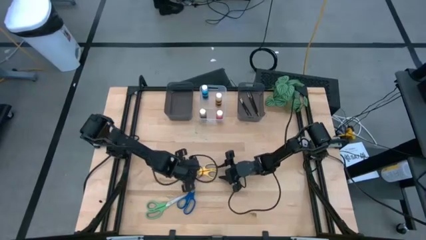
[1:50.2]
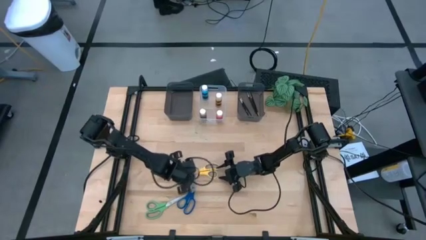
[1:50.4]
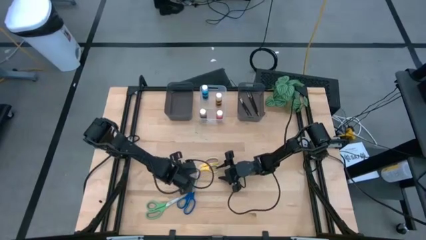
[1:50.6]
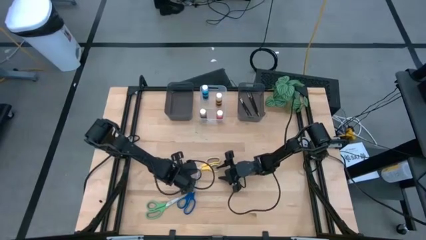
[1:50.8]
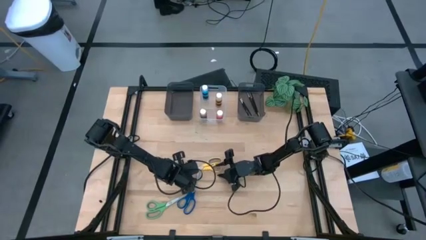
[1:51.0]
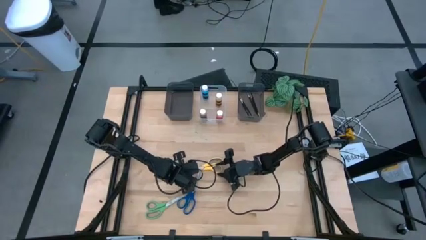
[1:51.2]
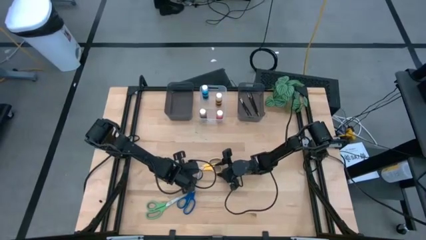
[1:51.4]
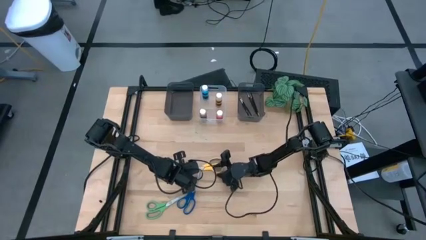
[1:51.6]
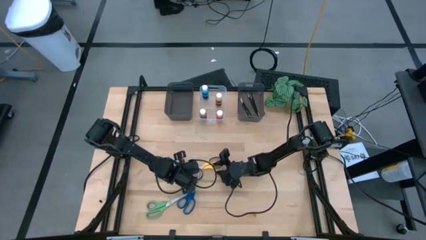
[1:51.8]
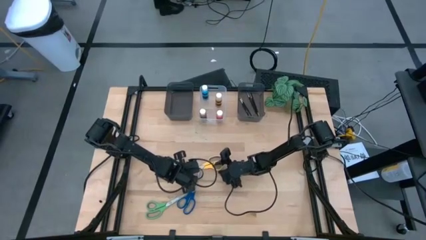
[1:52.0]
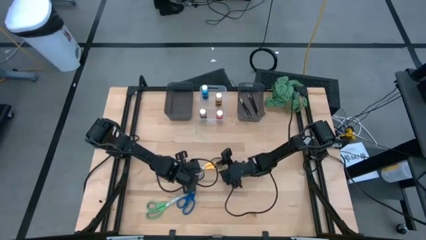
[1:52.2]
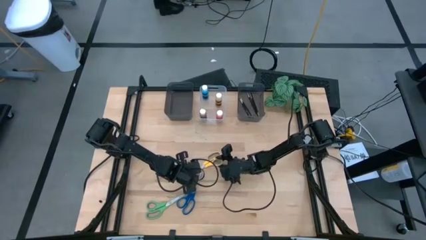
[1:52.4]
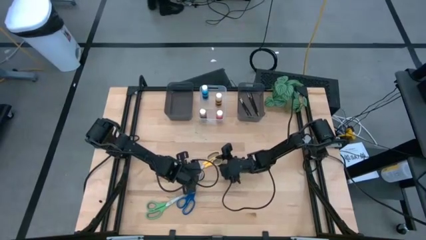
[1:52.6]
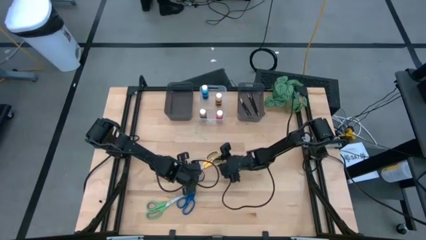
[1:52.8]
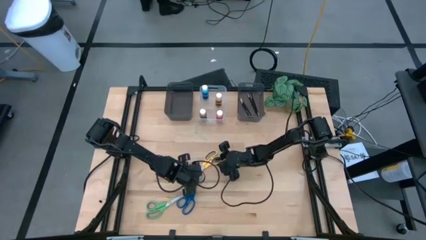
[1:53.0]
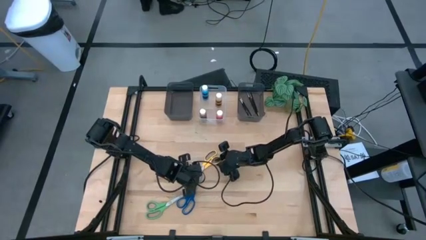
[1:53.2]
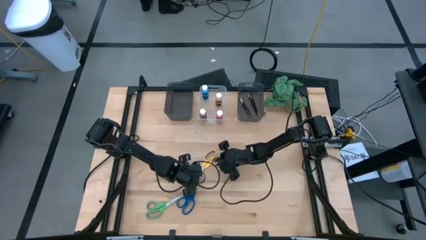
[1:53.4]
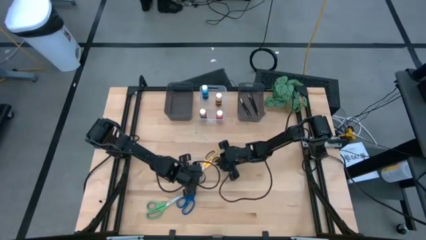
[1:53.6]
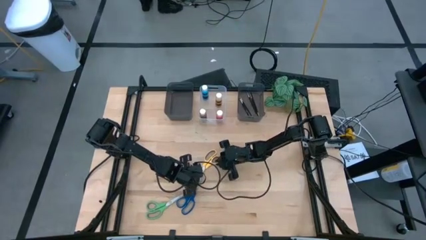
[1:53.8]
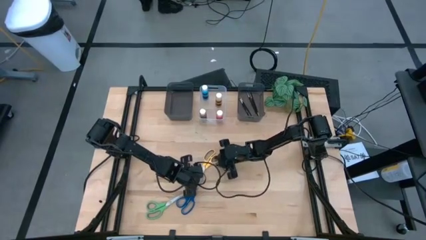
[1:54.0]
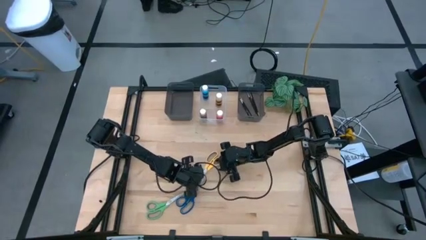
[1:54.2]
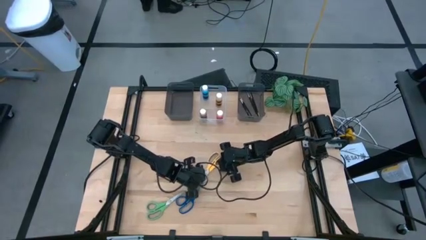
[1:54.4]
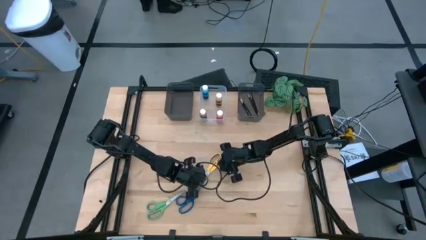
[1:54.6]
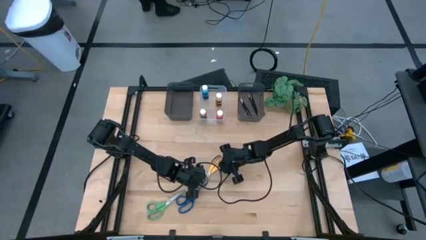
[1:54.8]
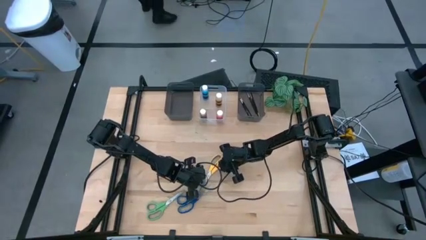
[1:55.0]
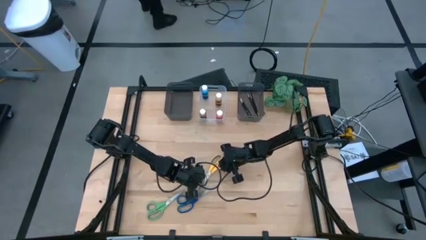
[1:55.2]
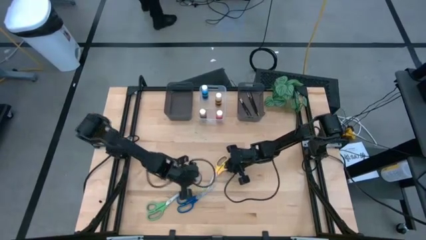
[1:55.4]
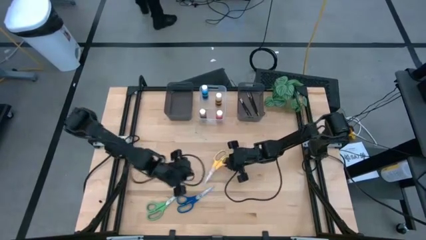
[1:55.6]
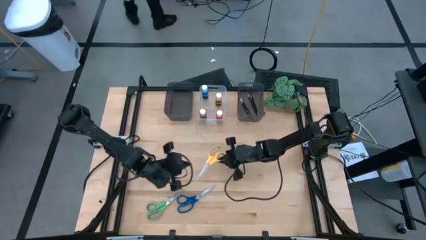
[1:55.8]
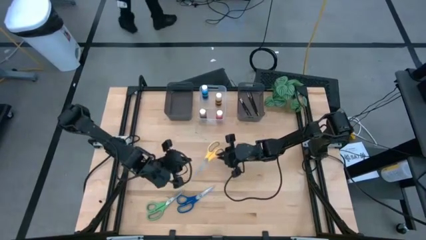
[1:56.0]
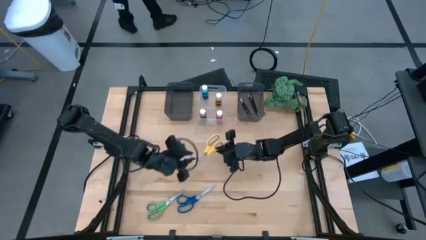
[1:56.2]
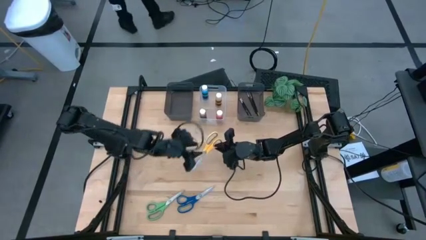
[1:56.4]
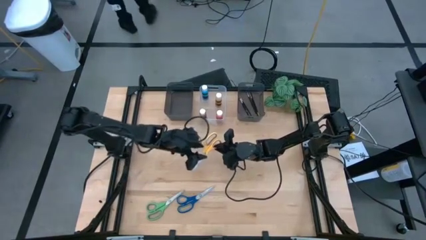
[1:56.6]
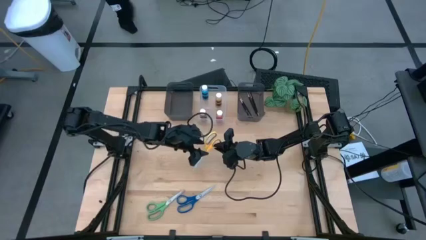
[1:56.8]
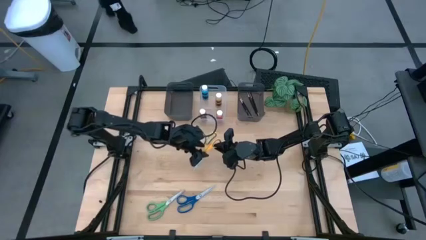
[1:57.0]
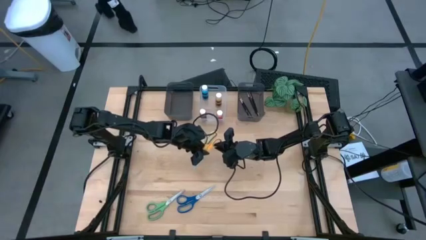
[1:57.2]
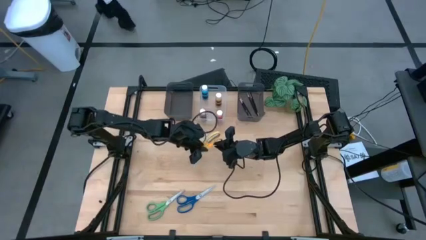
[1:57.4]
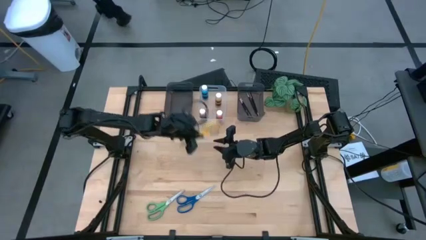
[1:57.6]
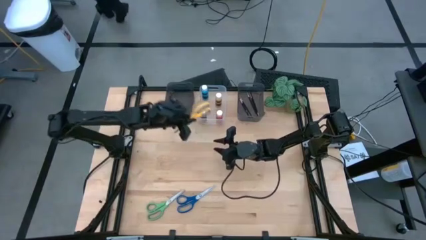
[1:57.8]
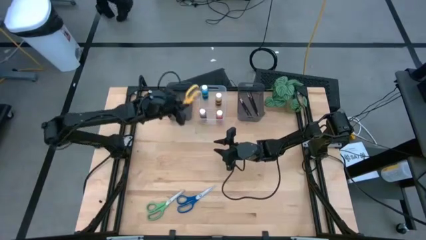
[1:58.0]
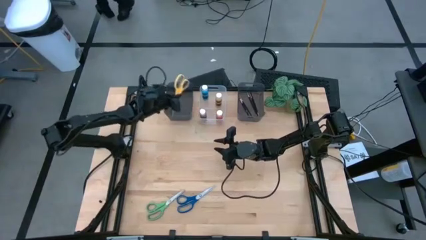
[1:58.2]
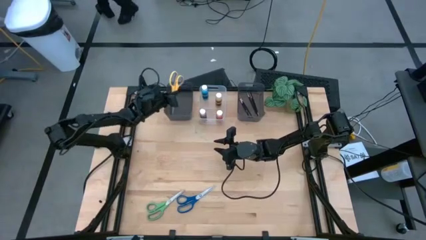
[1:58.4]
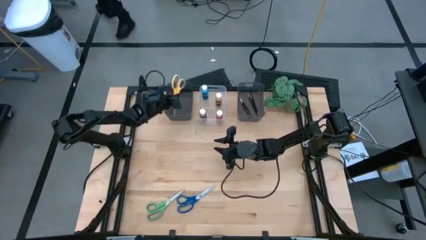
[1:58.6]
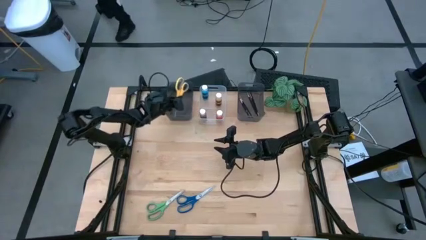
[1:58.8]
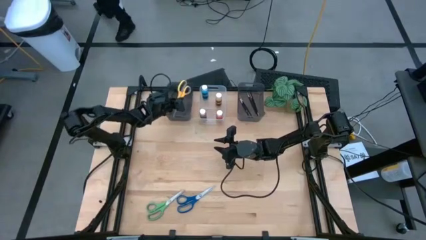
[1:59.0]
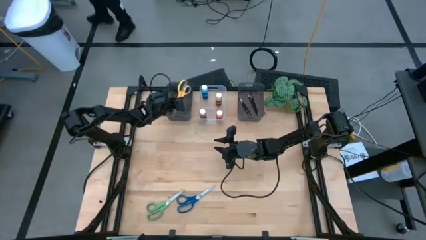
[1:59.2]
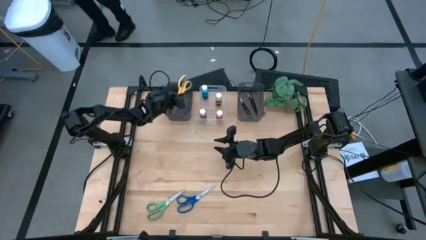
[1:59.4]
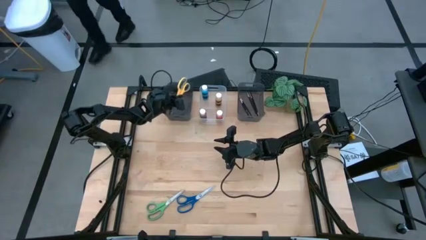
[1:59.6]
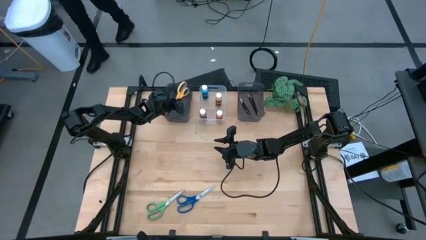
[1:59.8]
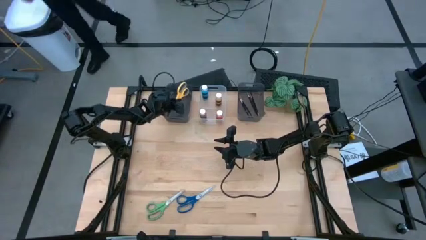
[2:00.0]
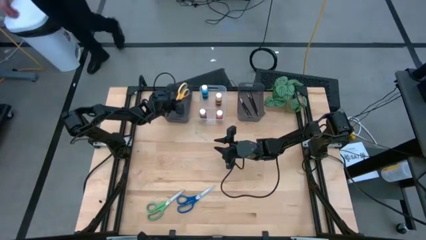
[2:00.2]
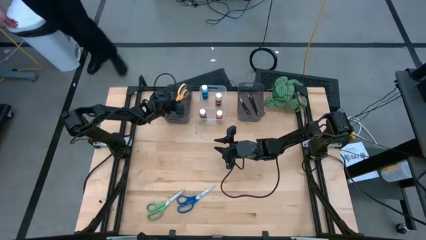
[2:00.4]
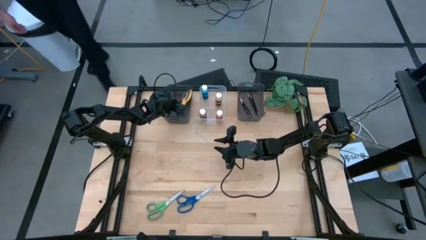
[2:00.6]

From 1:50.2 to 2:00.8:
Task: Pick & Place Paint Supplies
Put the yellow scissors into the left black bin
